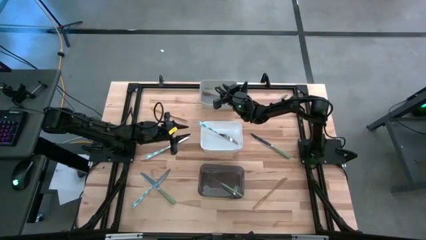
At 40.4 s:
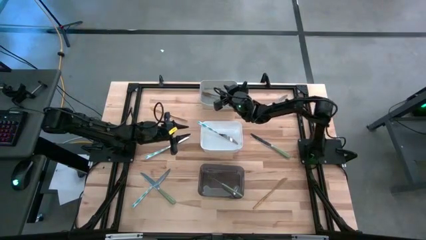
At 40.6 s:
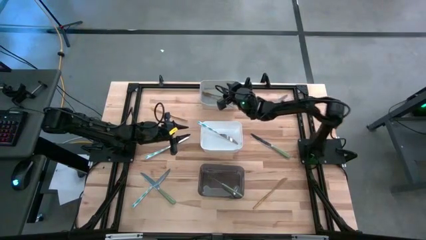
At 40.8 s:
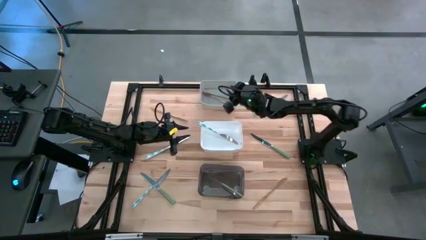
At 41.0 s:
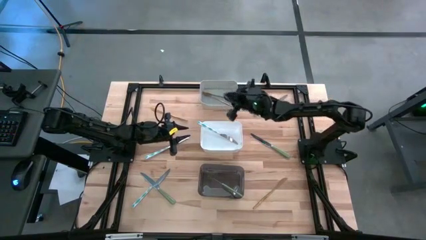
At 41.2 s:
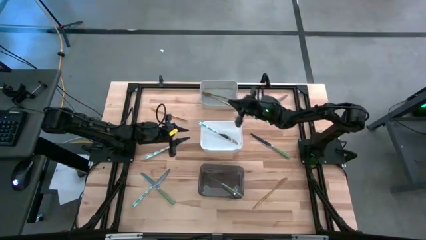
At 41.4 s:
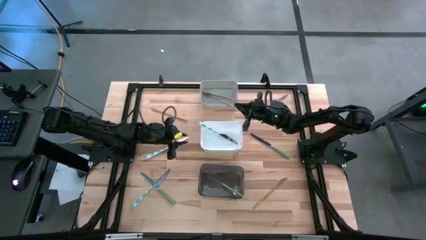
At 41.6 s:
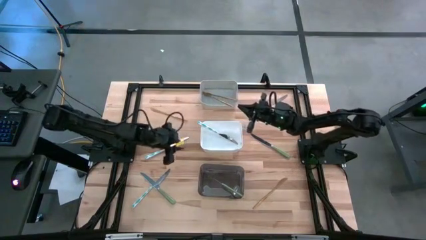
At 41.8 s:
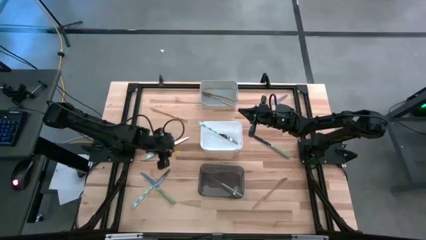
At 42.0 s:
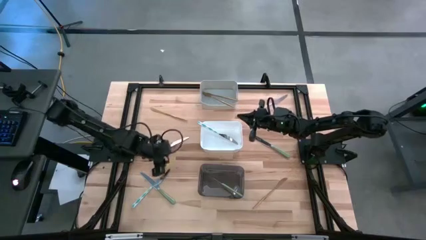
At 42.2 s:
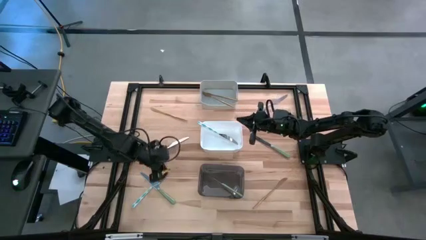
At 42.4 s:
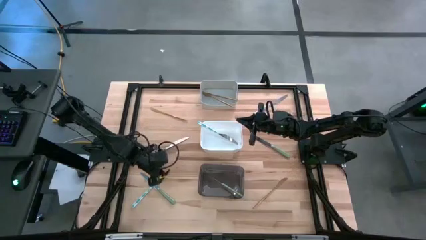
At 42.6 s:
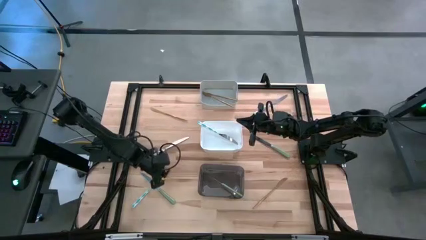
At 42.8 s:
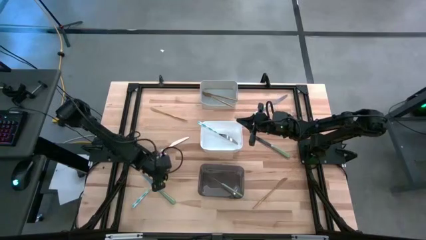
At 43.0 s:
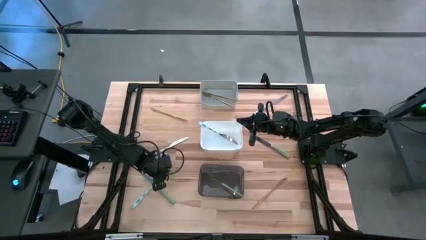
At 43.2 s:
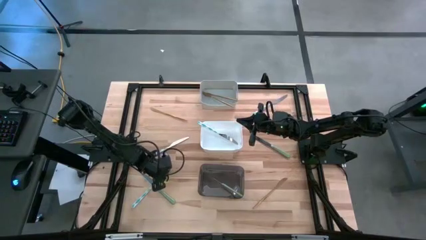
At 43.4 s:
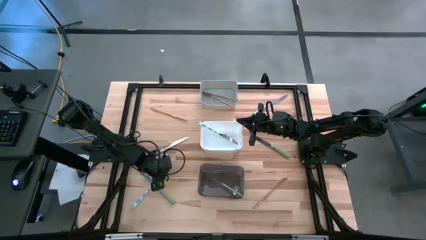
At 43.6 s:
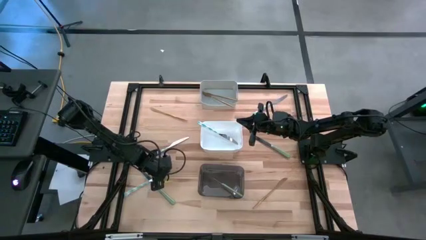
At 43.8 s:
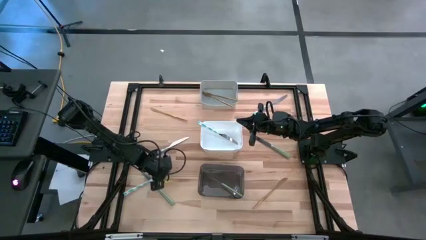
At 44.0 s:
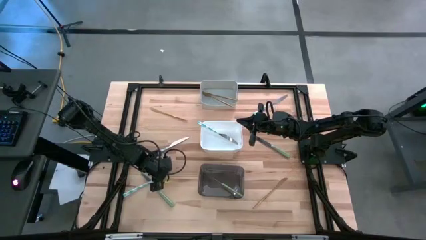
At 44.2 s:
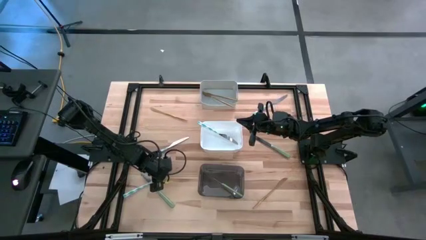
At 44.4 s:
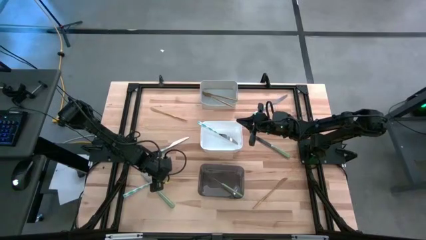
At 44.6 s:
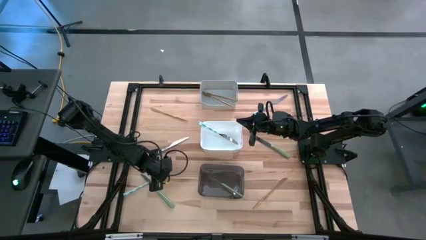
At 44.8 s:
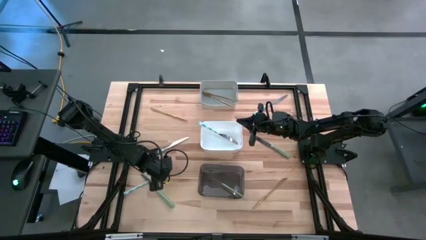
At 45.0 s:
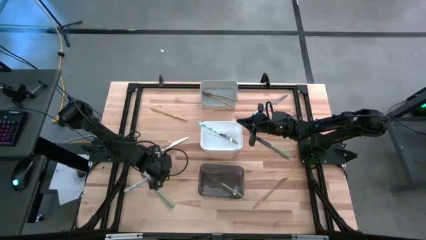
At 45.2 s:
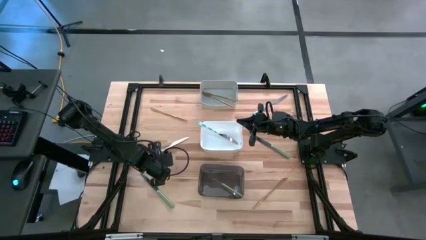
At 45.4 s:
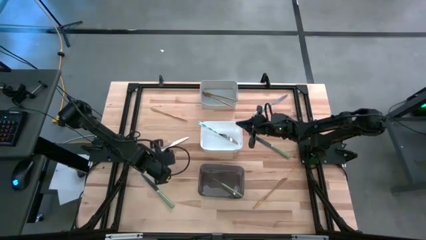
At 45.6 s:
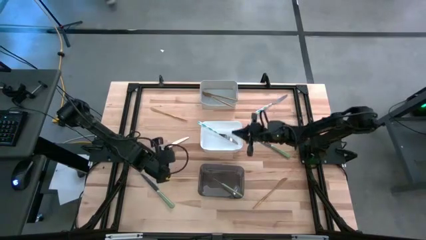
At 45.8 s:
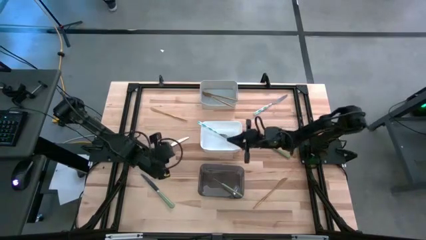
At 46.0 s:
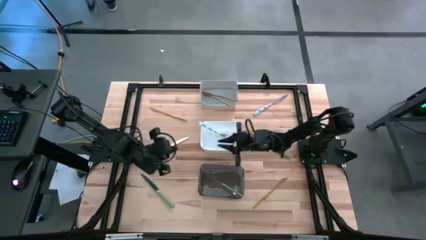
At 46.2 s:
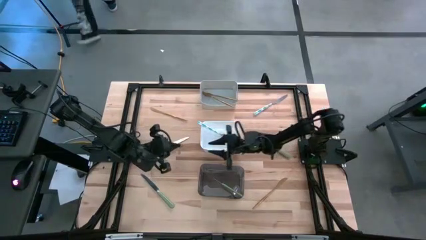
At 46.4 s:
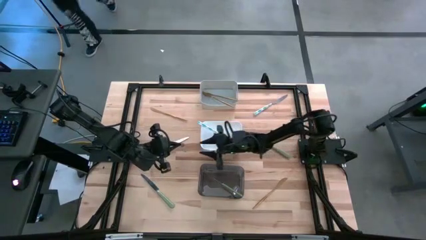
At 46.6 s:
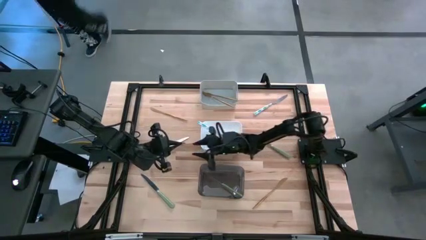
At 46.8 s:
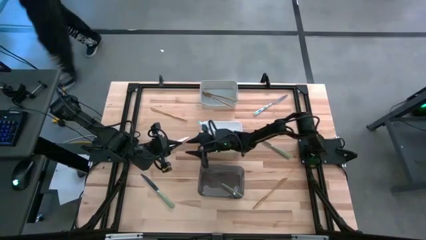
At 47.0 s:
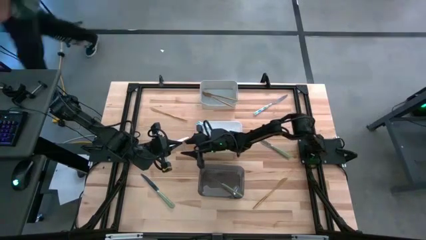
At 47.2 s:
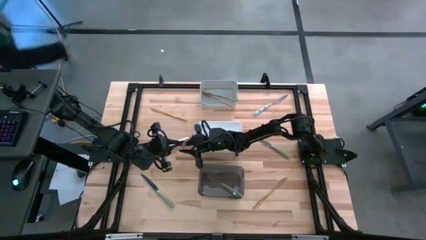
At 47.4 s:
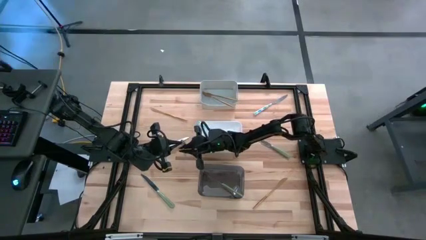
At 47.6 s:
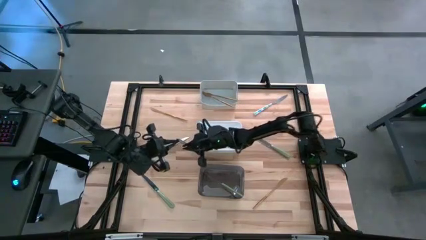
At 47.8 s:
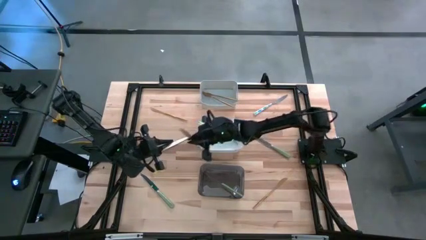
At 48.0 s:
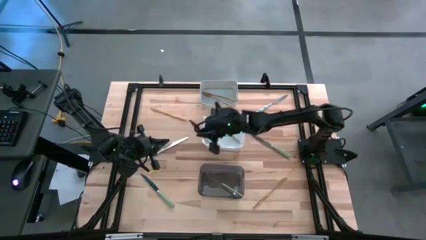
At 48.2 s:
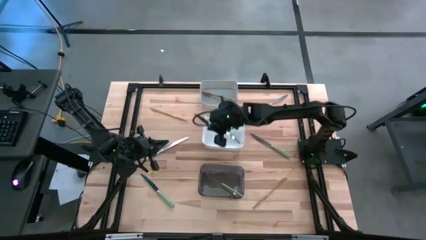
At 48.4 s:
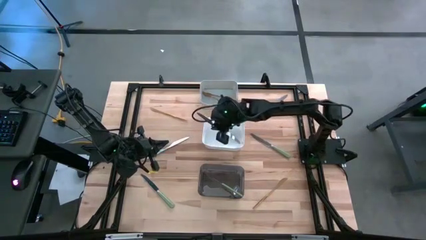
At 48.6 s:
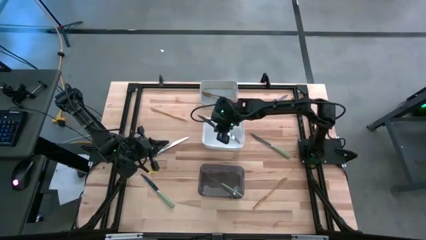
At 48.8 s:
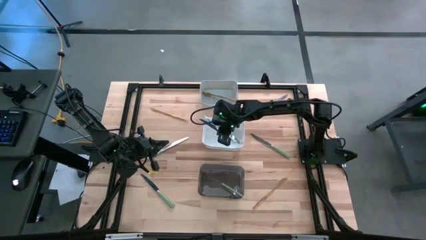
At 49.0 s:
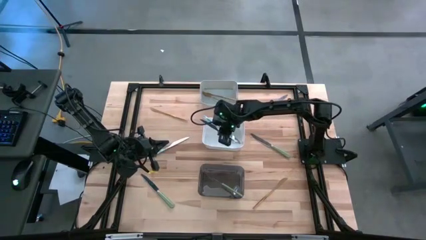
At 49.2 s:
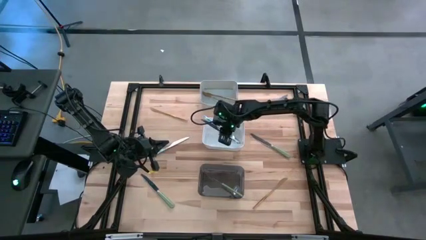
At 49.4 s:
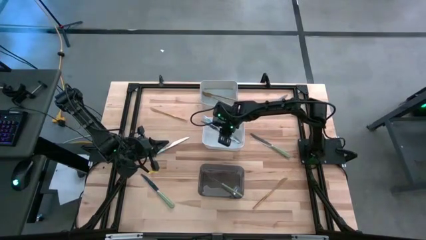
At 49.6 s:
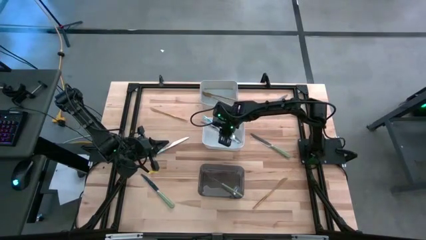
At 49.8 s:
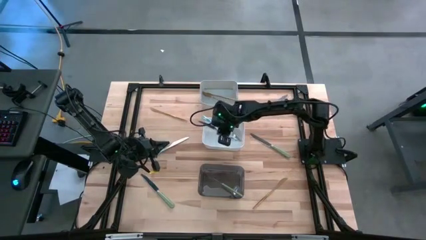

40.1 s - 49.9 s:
Task: Sort silverware by color (type)
Put the white-blue table knife into the white bin

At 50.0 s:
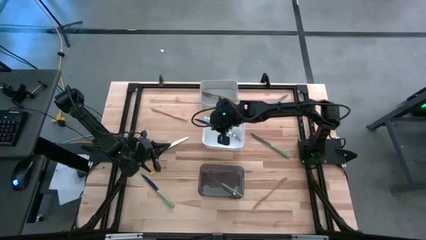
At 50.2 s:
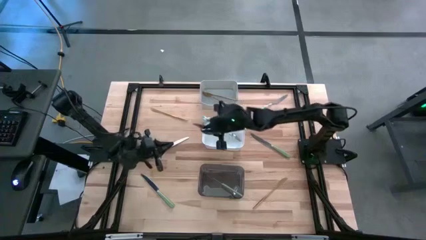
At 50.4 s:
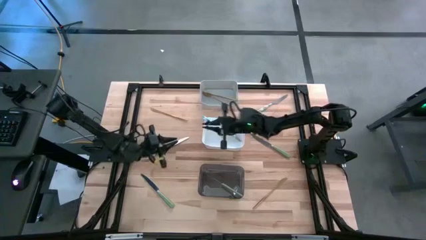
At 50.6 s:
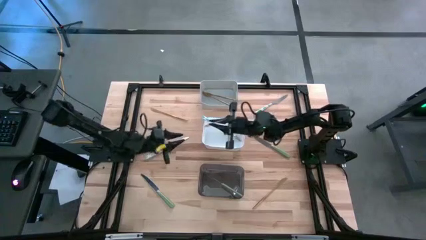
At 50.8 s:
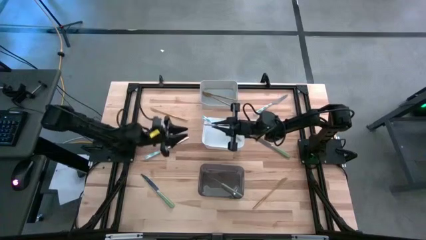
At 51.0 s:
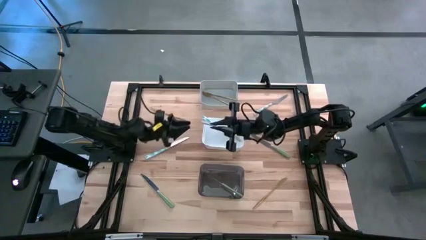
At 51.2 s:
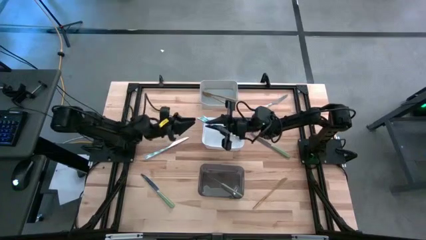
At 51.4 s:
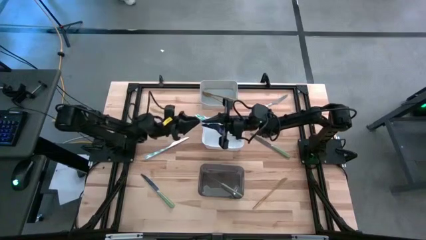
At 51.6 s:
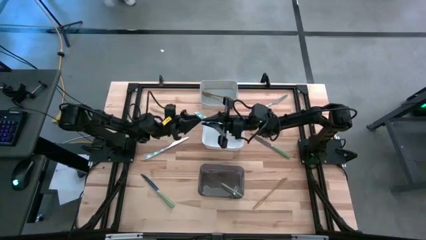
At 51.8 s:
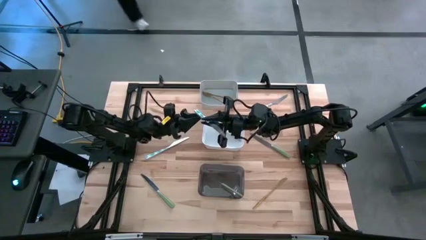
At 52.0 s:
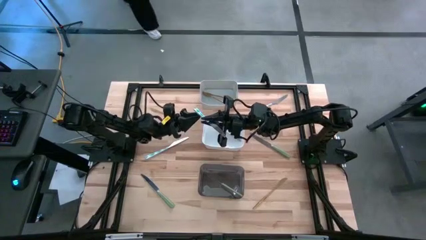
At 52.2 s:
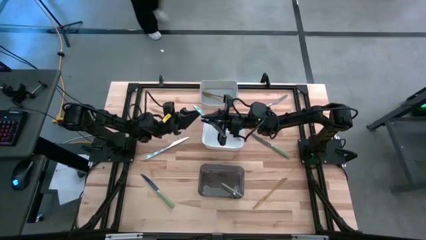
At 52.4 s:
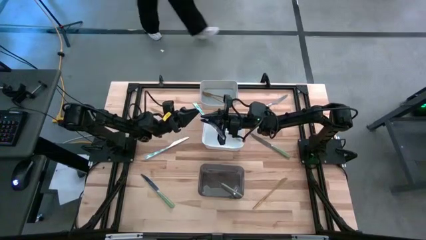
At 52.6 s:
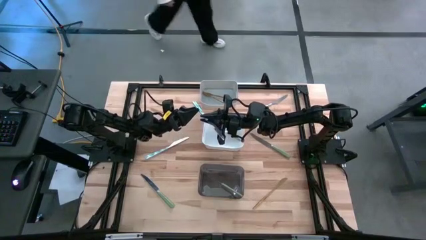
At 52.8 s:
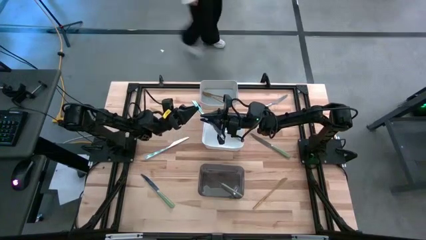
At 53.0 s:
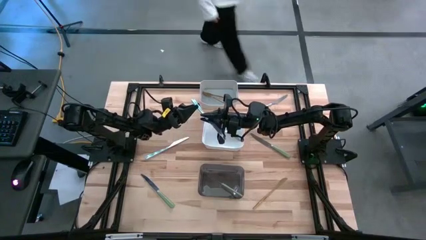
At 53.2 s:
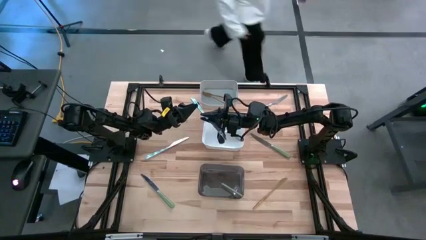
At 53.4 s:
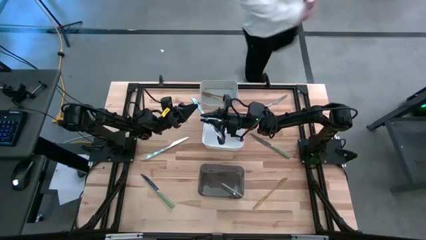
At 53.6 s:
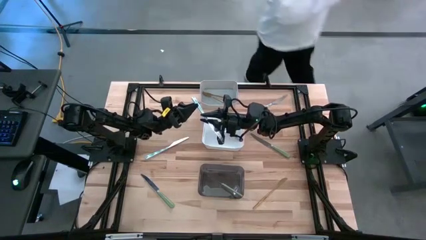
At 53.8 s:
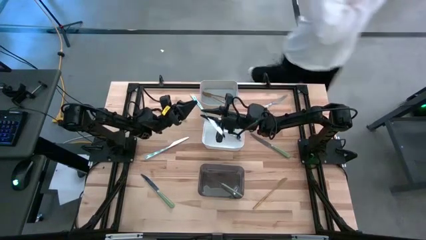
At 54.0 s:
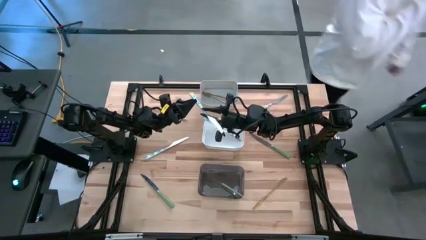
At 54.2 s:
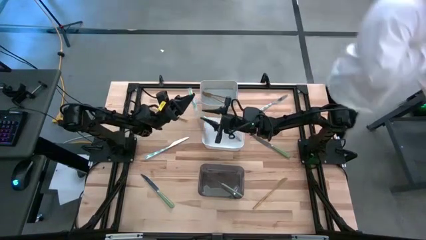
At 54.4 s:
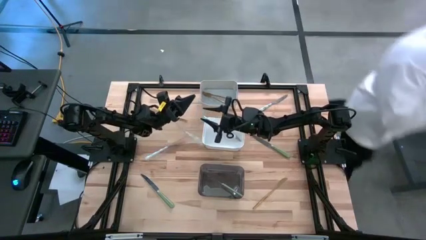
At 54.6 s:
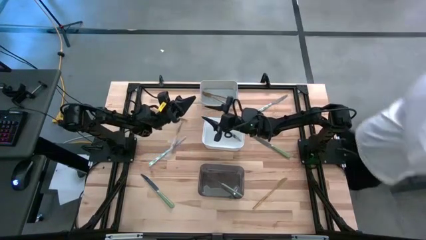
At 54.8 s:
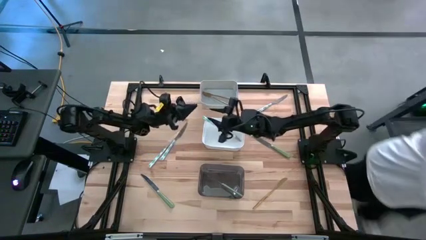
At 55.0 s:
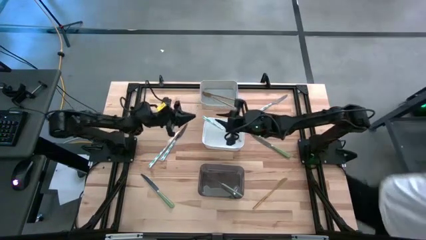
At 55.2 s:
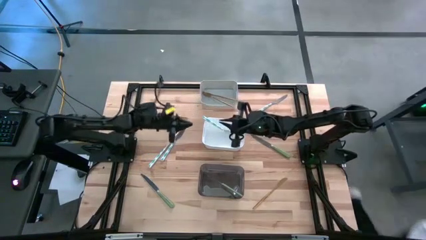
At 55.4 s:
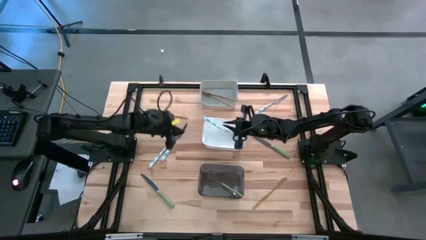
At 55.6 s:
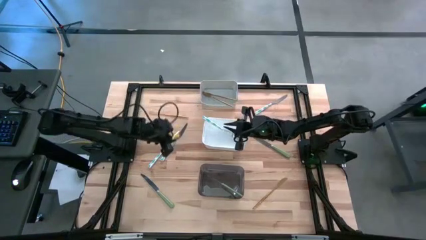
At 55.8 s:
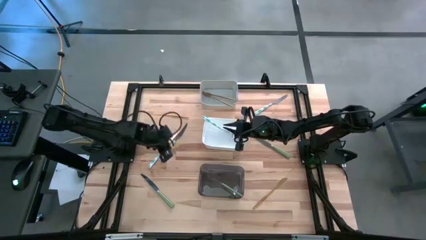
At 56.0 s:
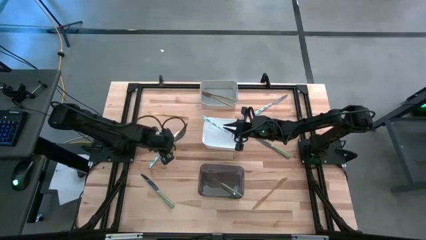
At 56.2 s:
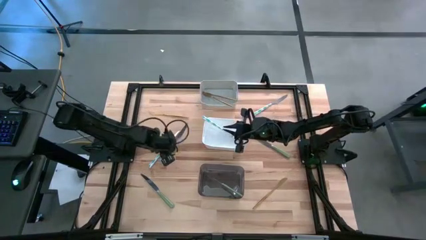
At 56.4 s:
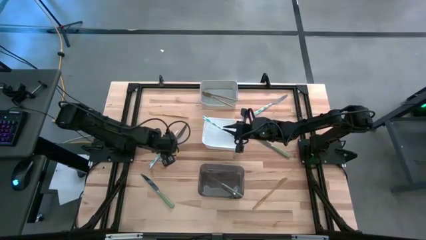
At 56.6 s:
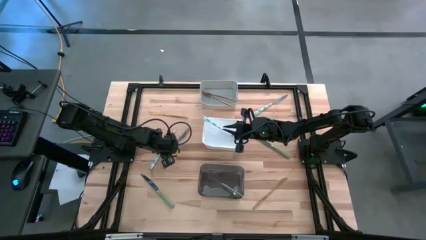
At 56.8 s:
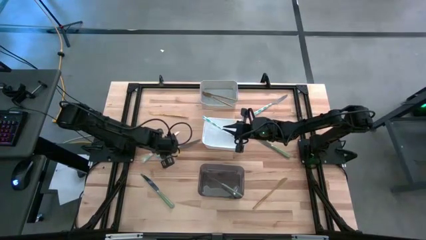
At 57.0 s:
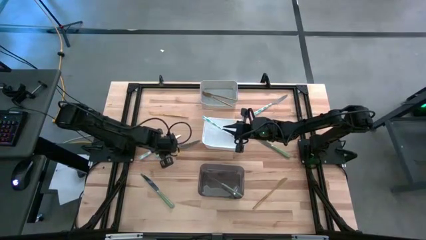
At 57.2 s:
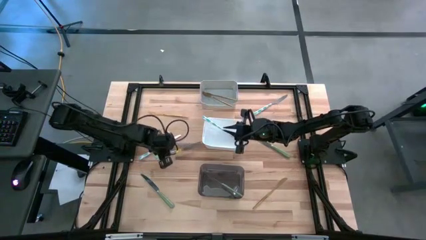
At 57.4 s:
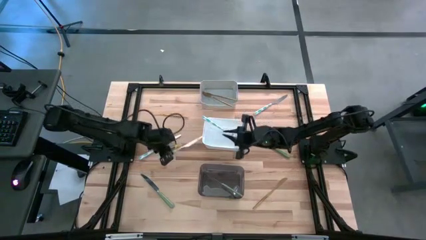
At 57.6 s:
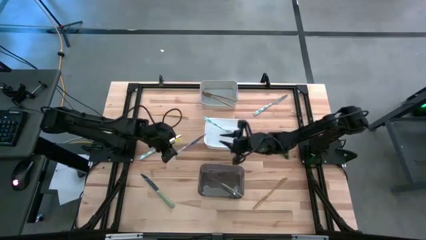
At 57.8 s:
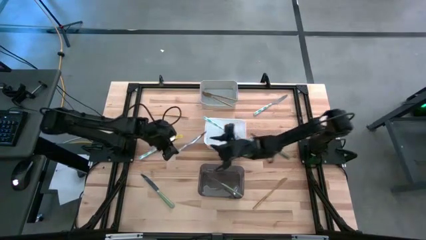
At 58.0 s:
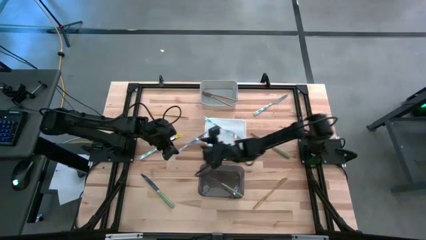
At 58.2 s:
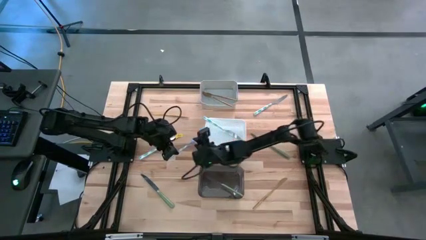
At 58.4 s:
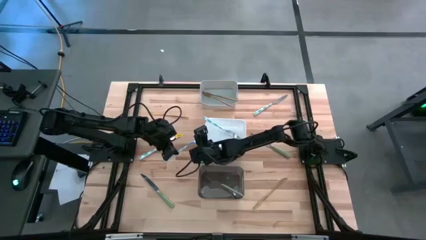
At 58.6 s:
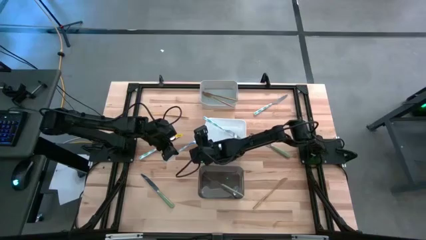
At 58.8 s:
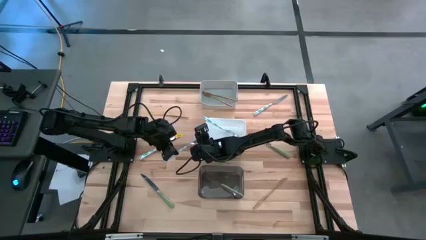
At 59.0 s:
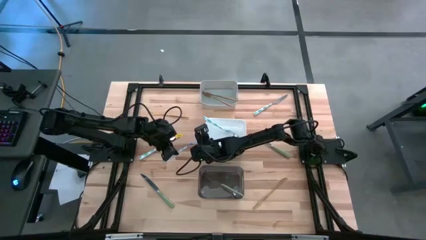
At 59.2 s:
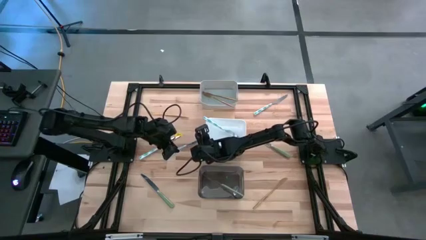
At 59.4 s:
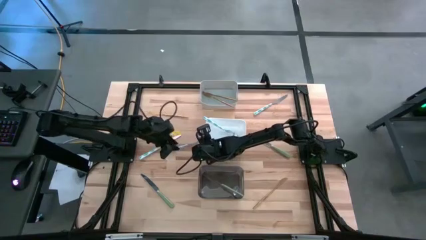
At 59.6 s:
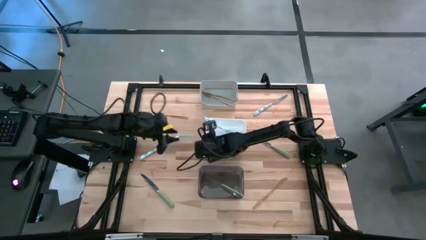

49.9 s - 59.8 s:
Put the white-blue table knife into the white bin
